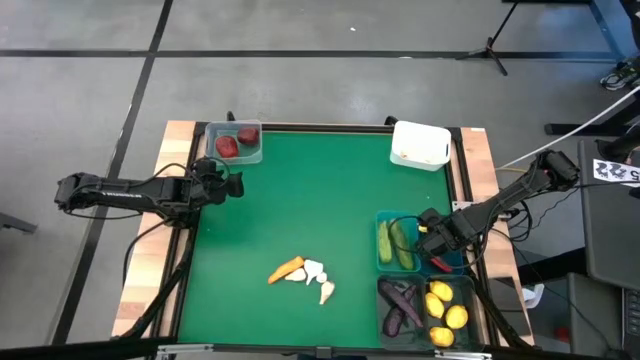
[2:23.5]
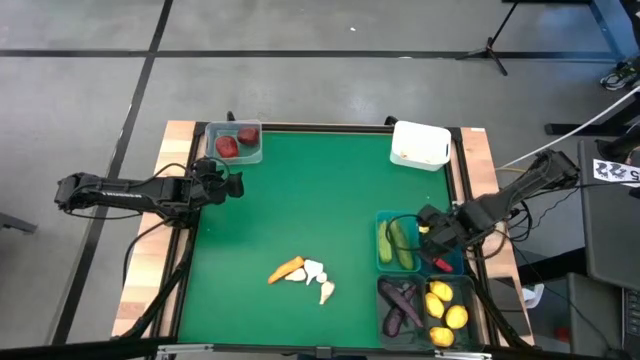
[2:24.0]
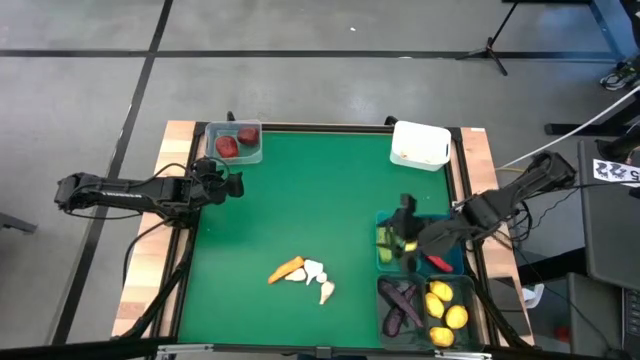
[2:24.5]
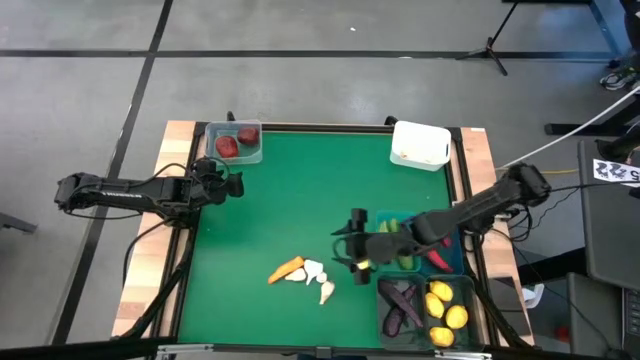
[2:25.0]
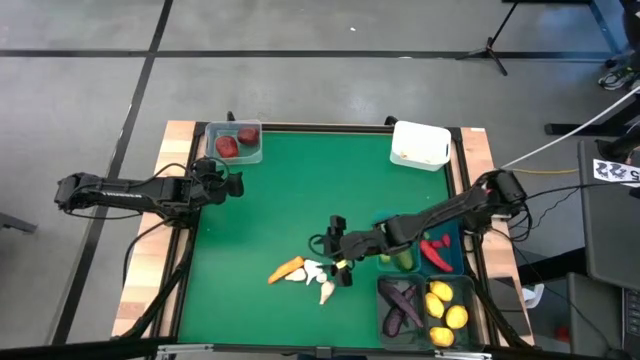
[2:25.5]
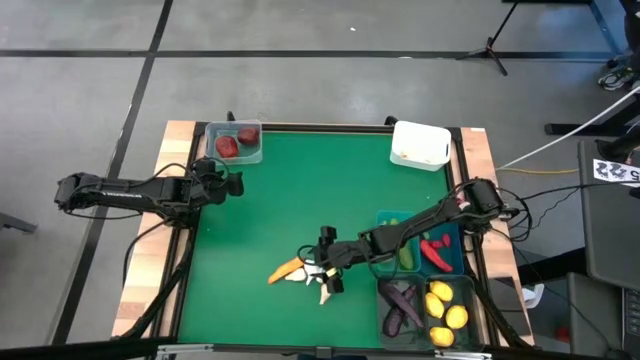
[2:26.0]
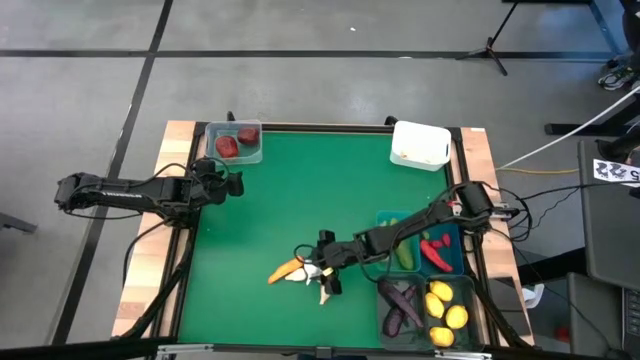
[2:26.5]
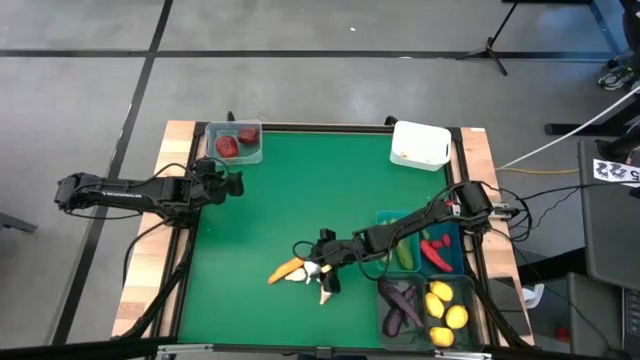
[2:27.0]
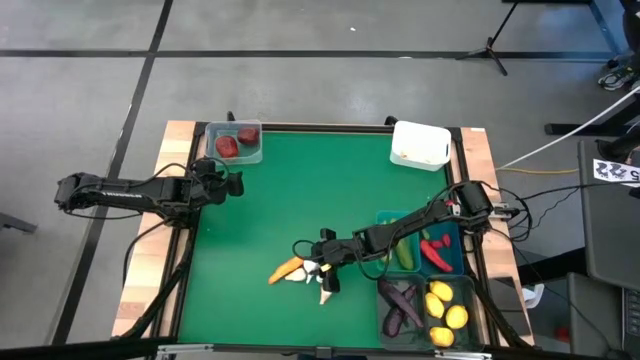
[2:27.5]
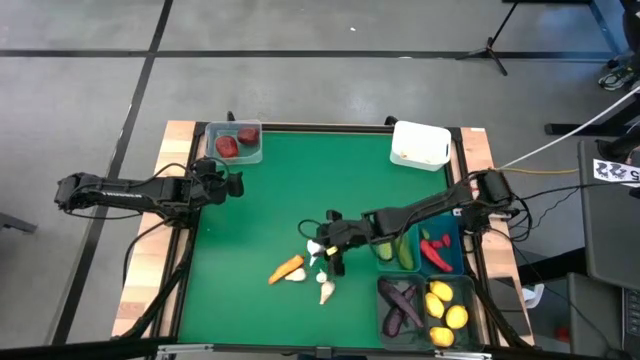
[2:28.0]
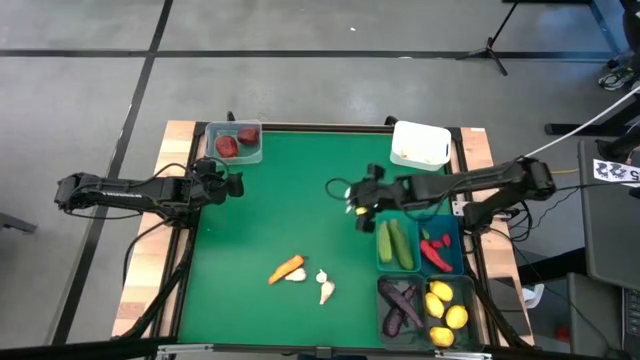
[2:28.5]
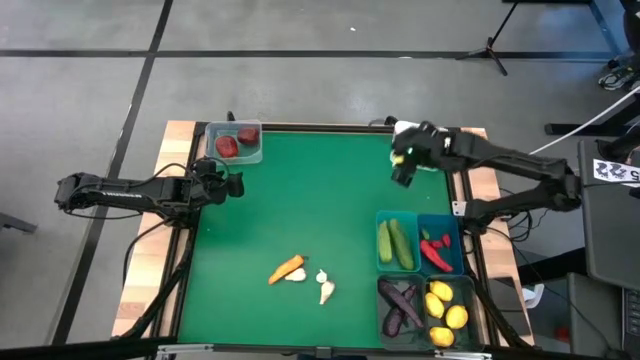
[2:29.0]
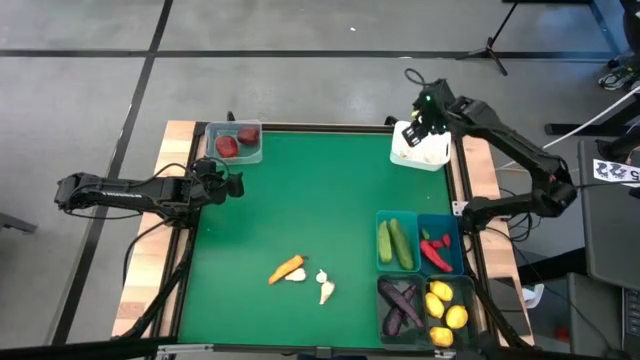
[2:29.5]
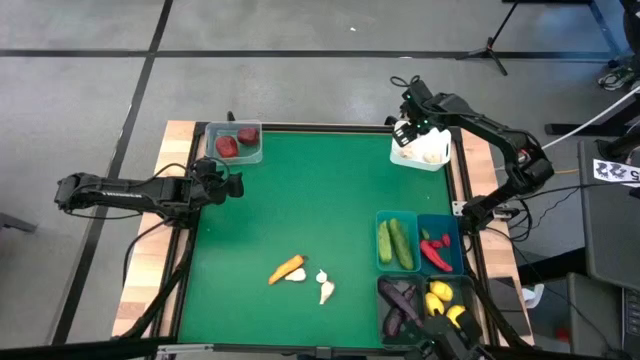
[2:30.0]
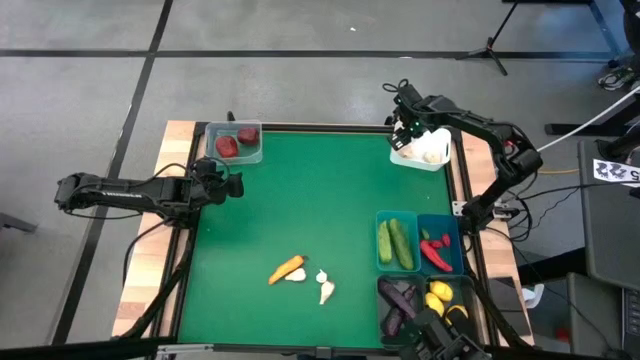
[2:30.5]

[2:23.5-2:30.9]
Task: Sort produce into baskets
Put the garlic into the white bin

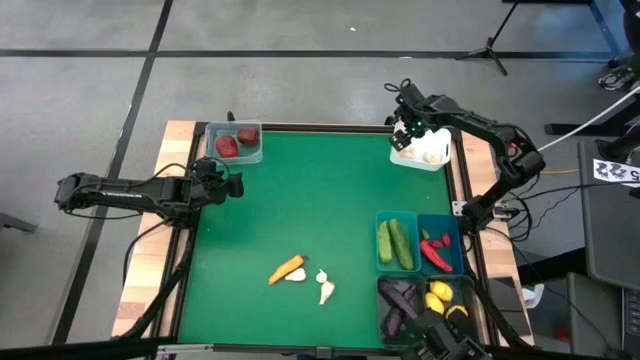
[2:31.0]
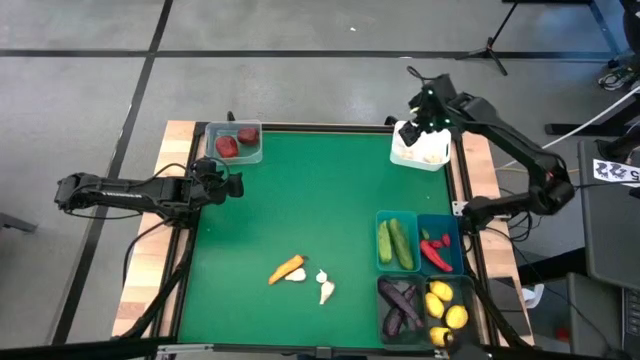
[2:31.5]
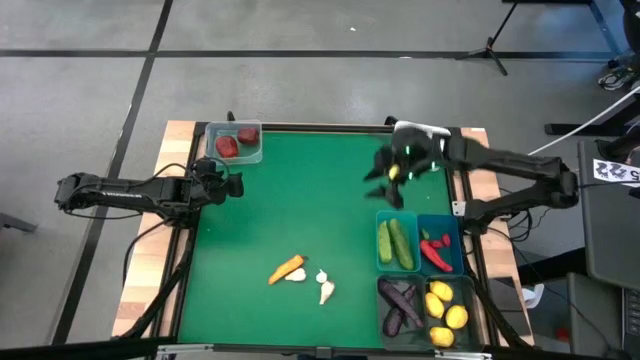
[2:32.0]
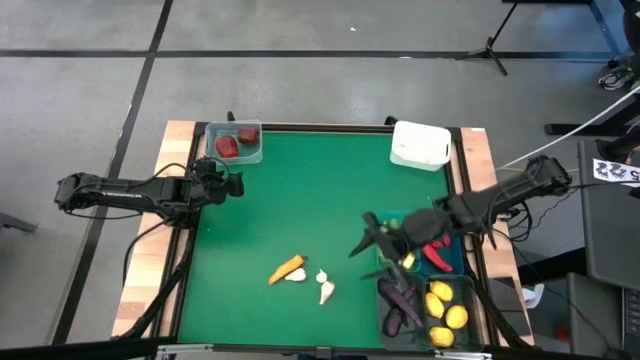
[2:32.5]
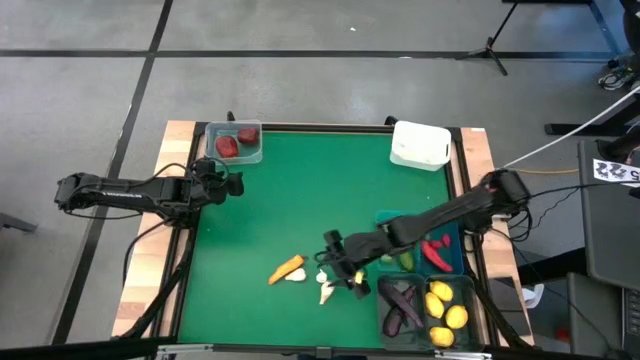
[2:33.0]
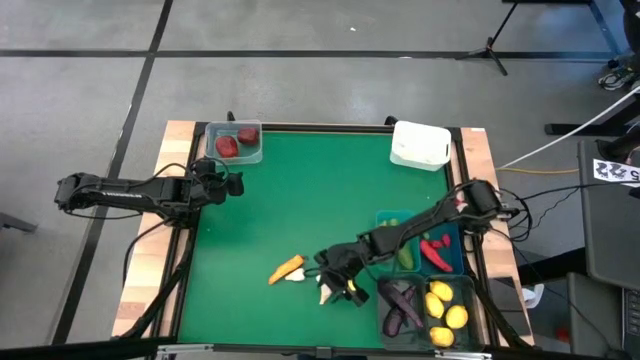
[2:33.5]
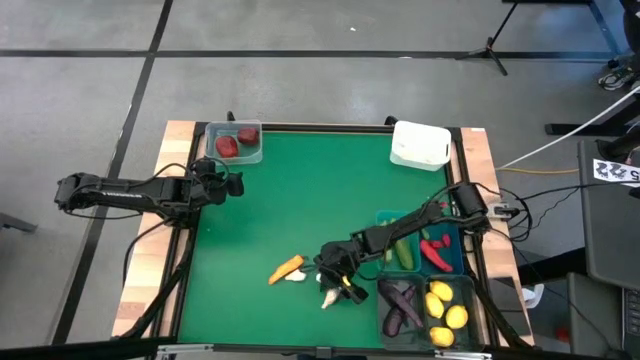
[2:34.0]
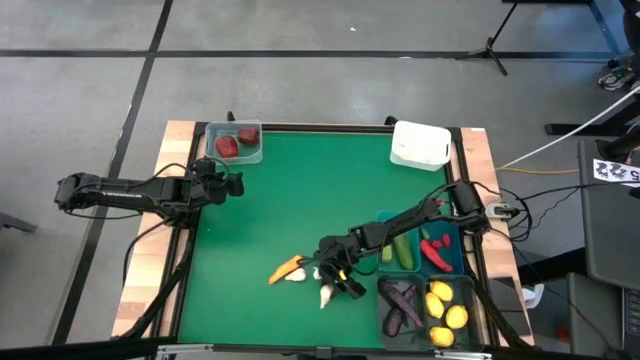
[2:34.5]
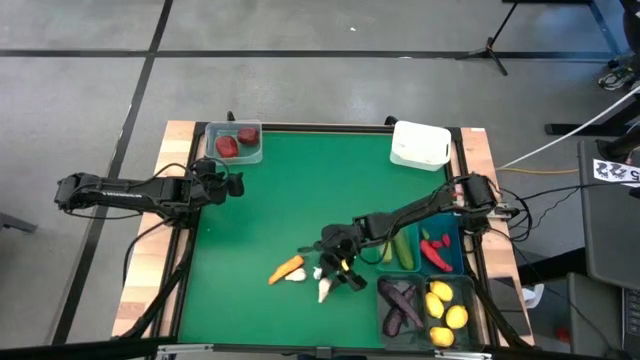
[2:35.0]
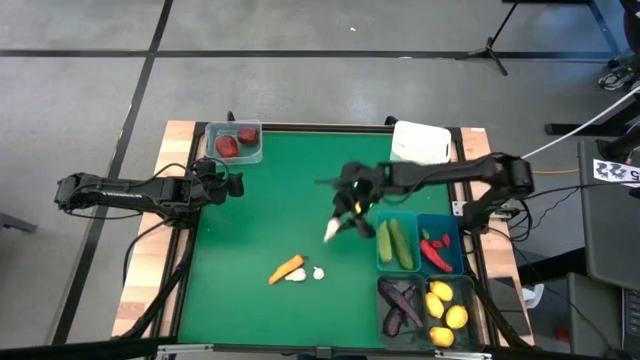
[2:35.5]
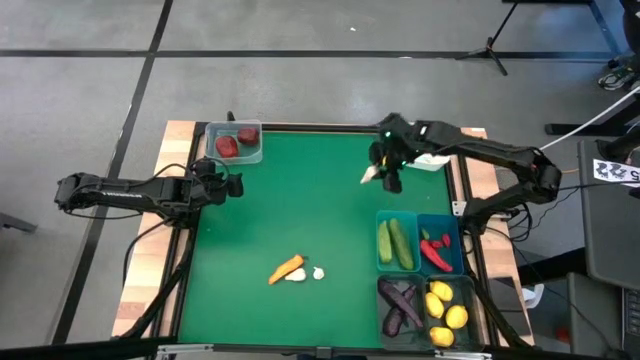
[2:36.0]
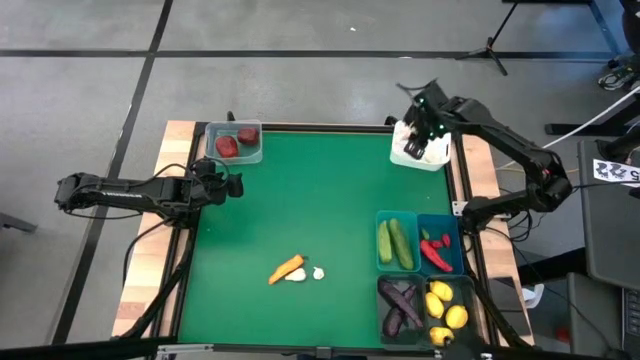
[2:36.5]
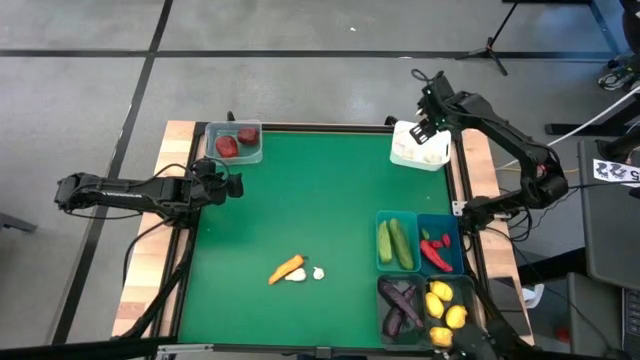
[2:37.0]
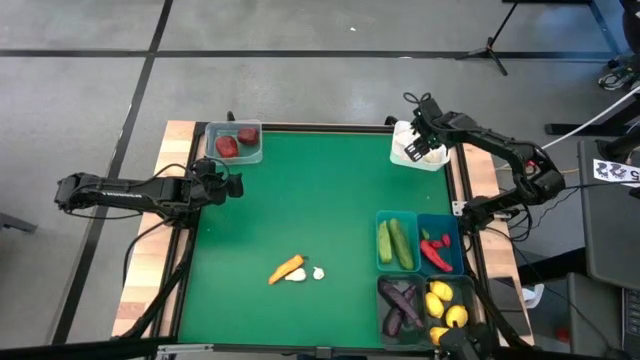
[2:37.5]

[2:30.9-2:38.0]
Put the garlic into the white bin

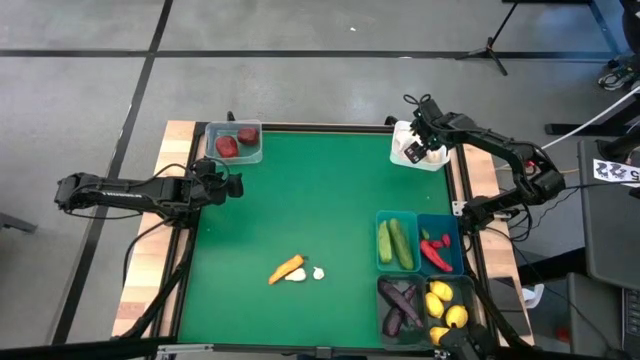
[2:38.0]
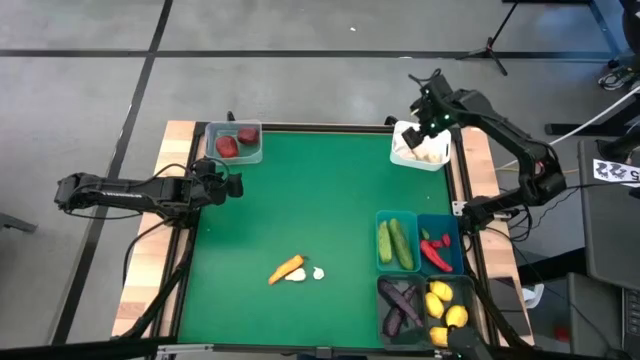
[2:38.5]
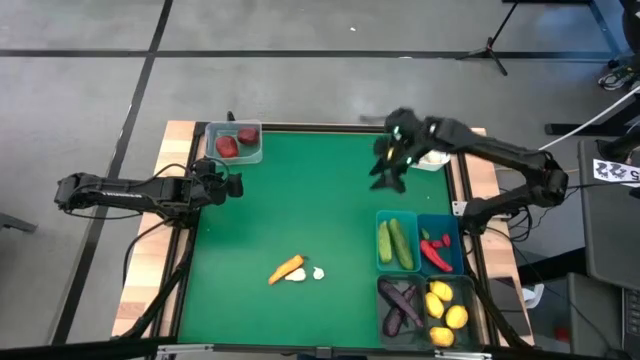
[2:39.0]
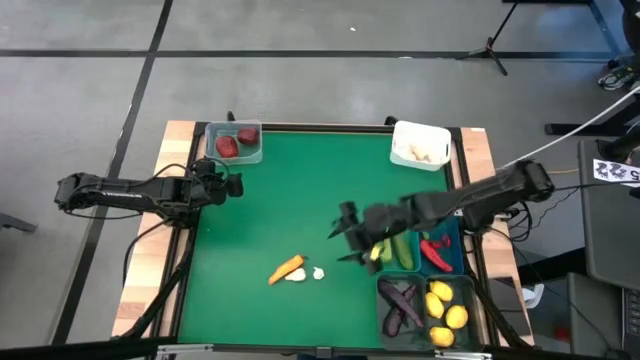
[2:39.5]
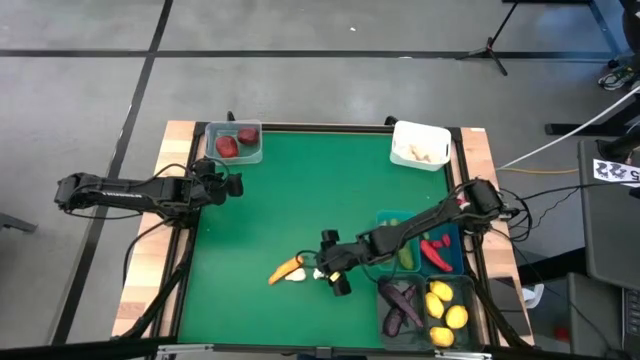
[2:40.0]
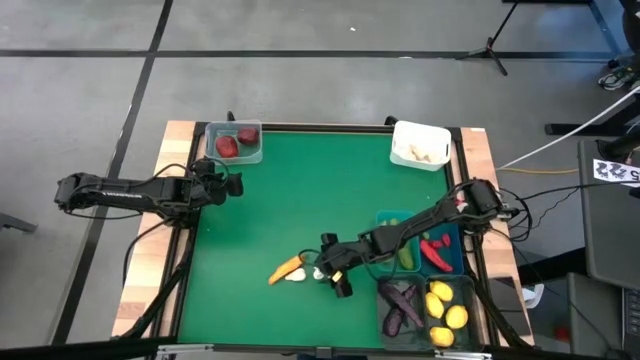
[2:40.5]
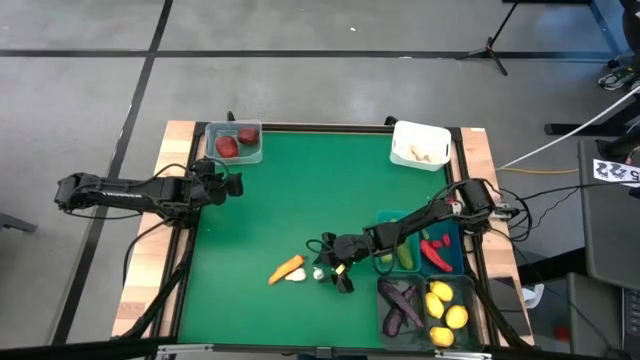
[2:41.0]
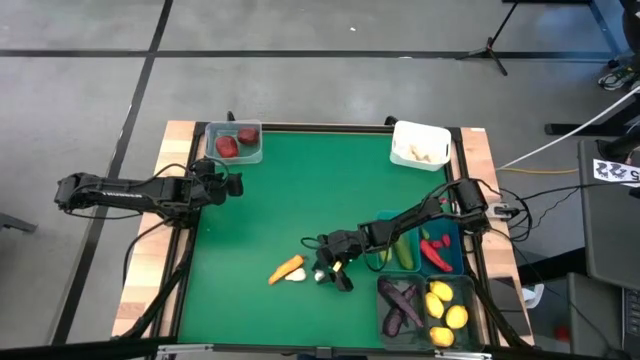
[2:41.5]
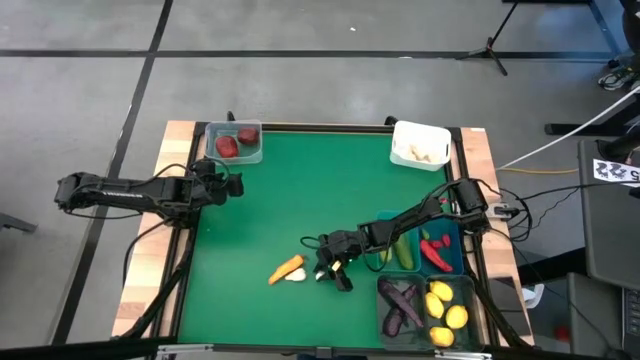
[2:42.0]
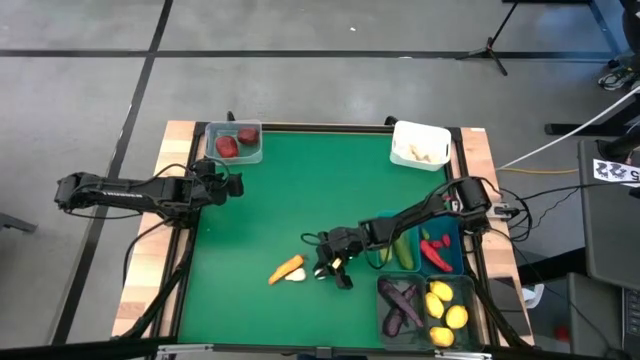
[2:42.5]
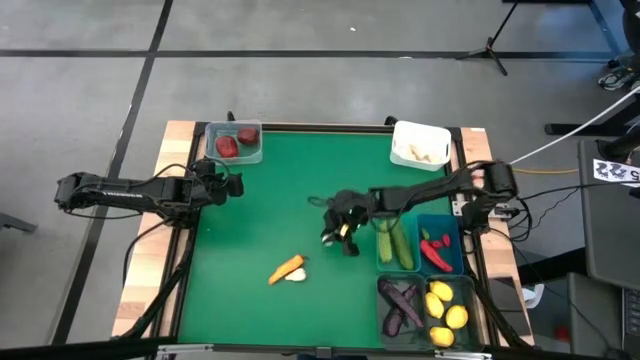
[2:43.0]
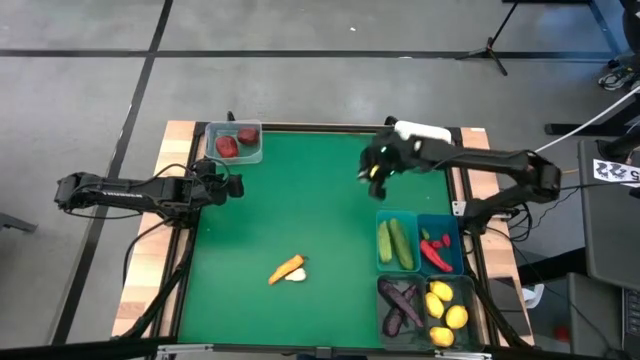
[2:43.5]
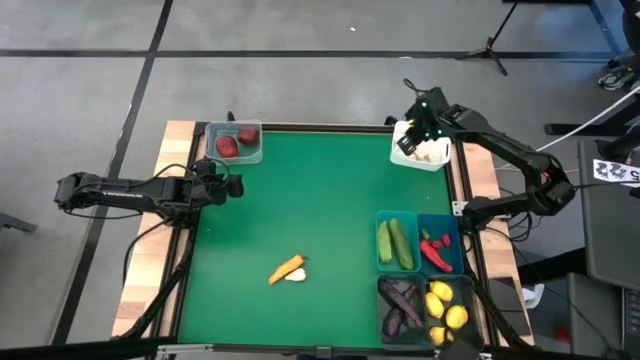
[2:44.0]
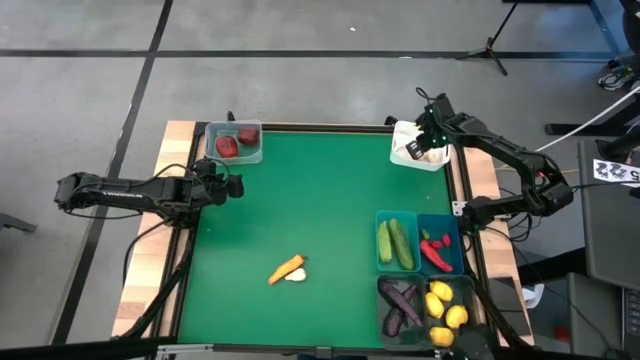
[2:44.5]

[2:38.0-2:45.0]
Put the garlic into the white bin

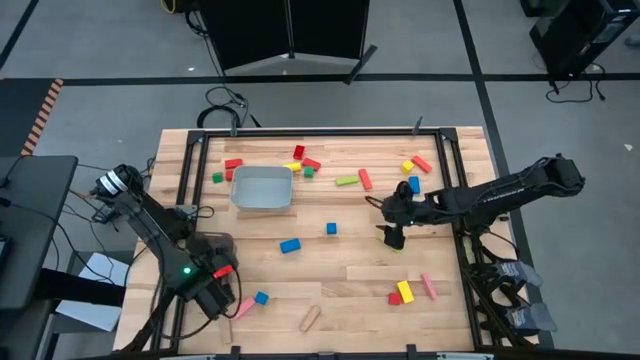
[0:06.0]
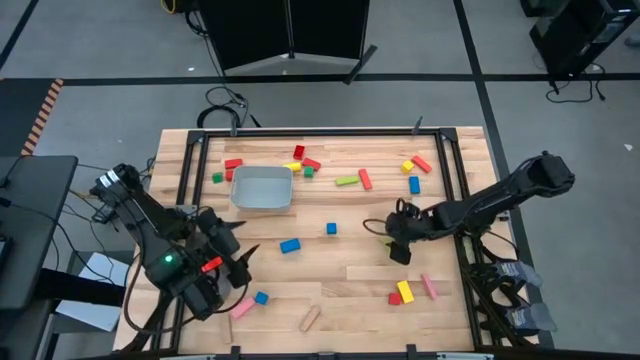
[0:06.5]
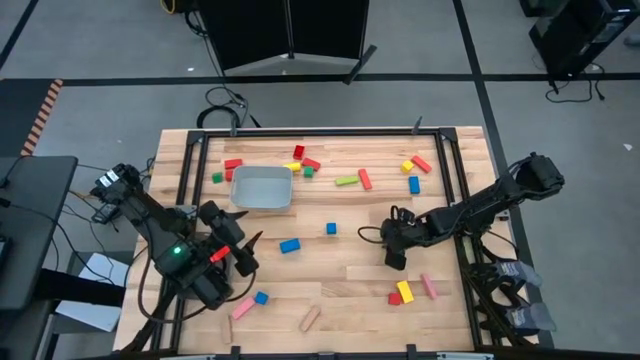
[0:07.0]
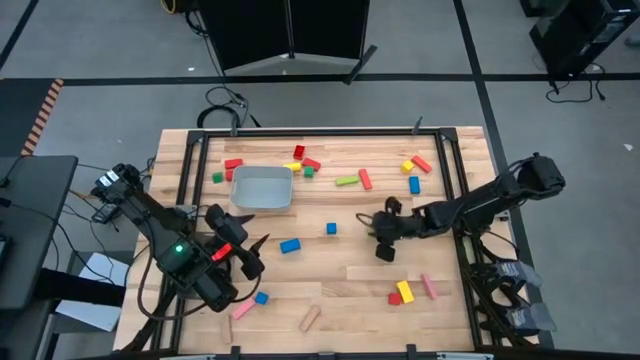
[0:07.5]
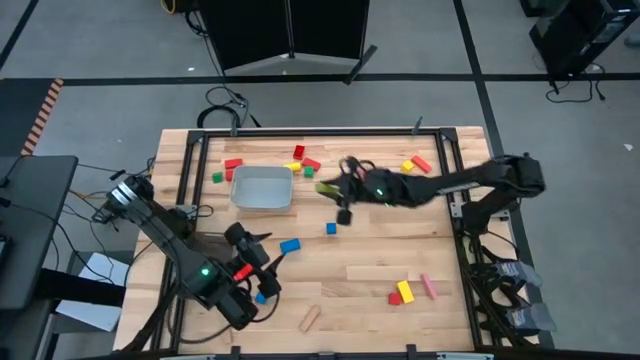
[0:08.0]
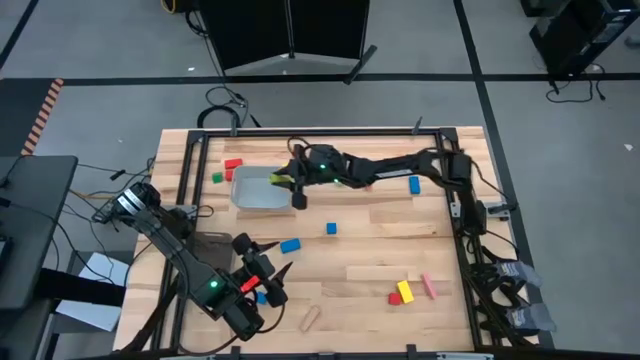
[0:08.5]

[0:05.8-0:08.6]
Task: Sort blocks by size
Put the apple green rectangular block into the gray bin
